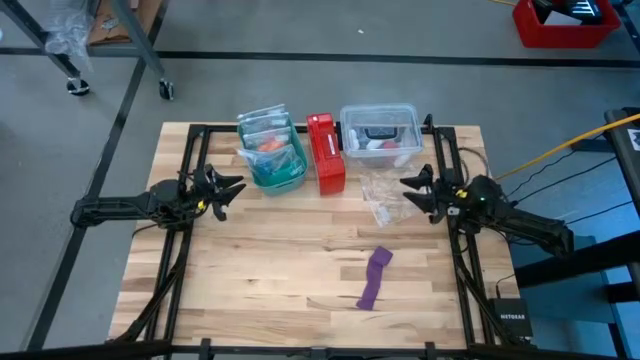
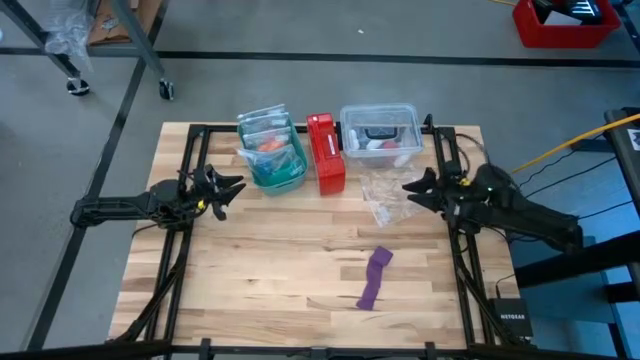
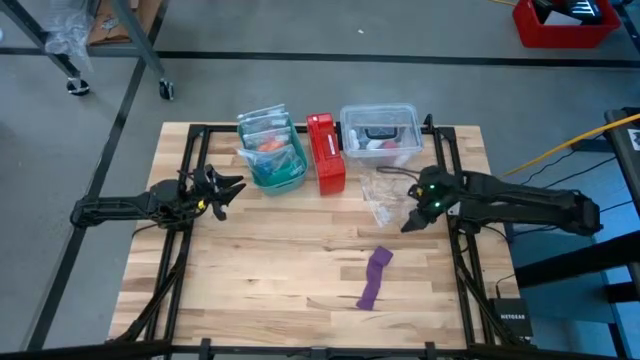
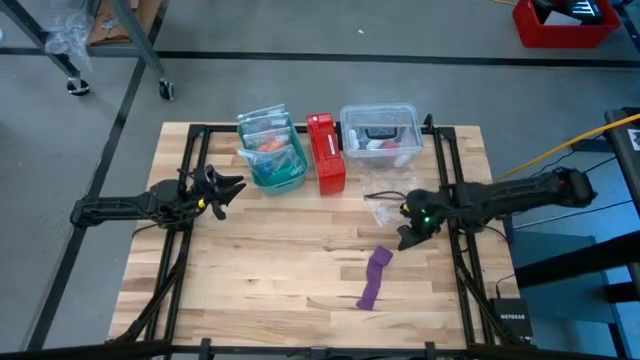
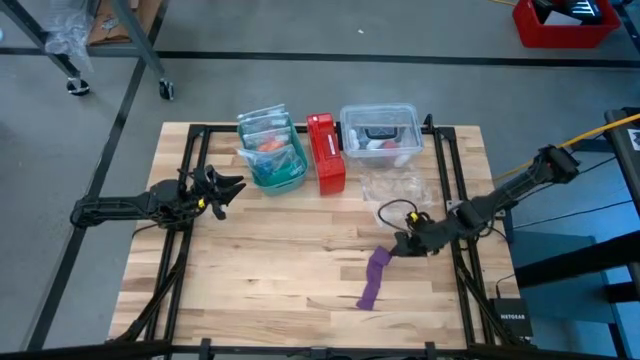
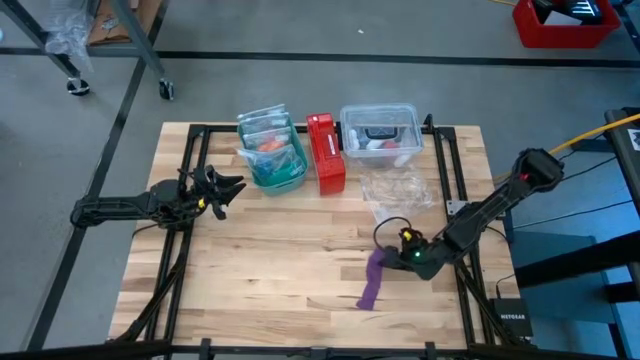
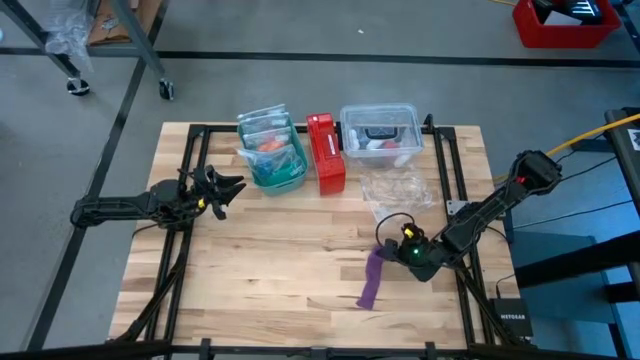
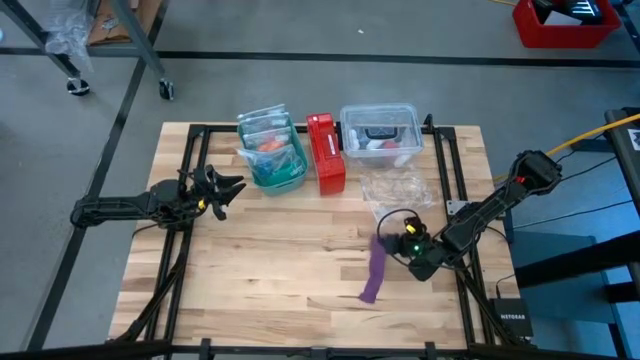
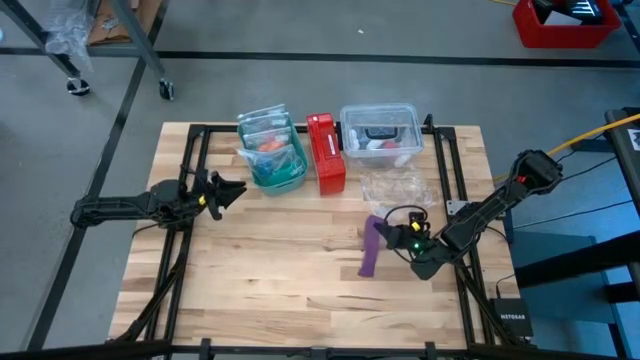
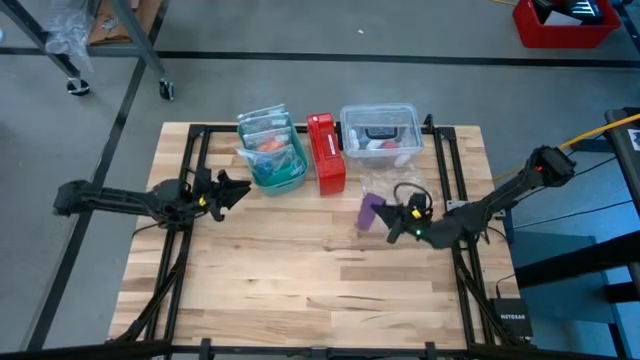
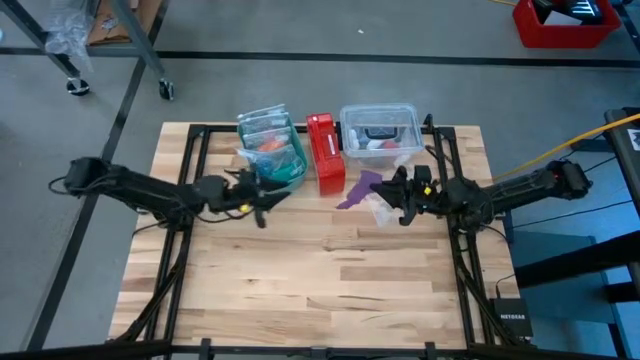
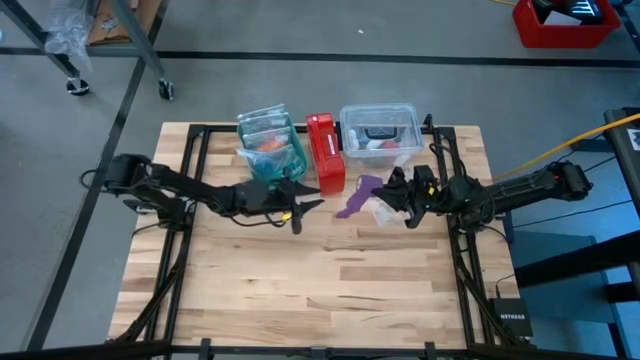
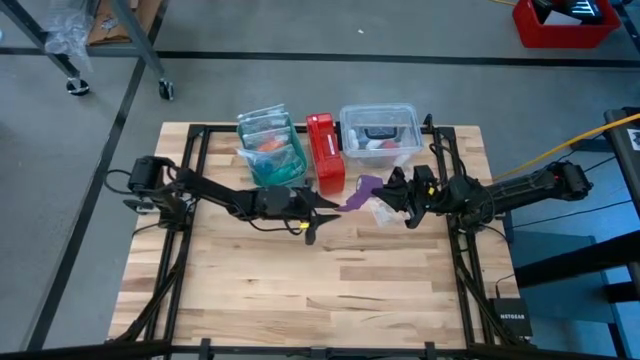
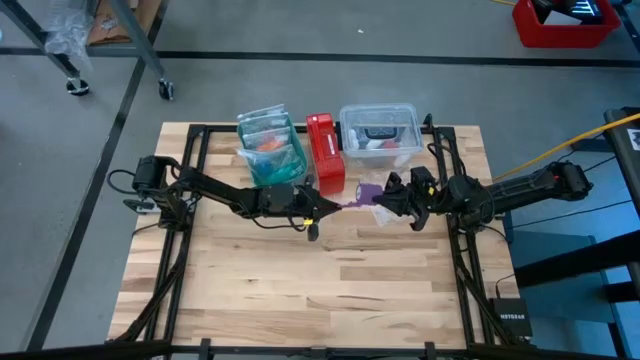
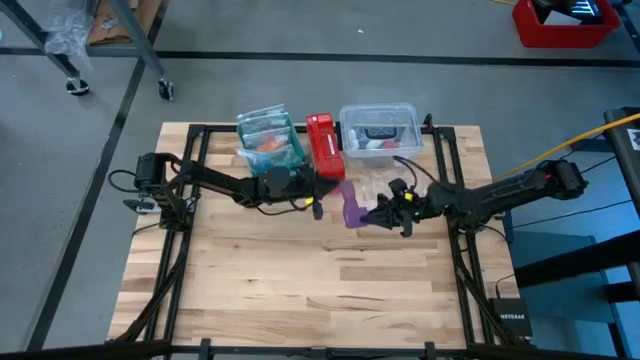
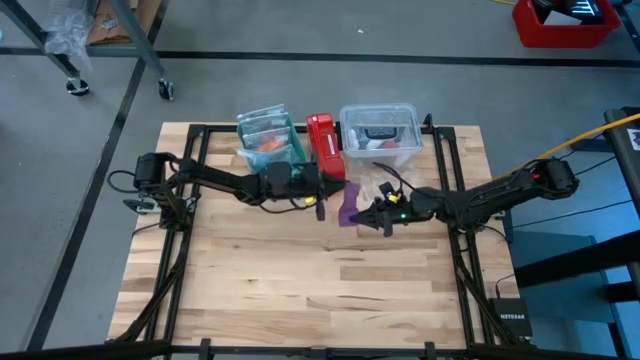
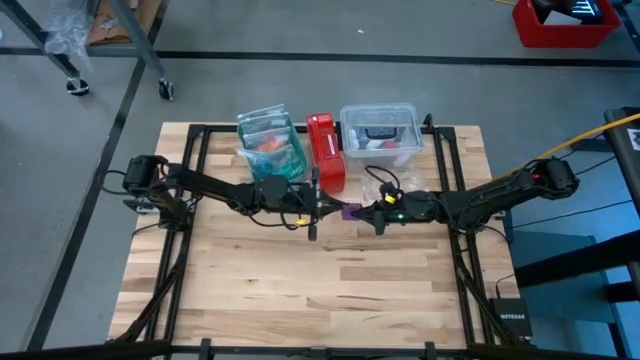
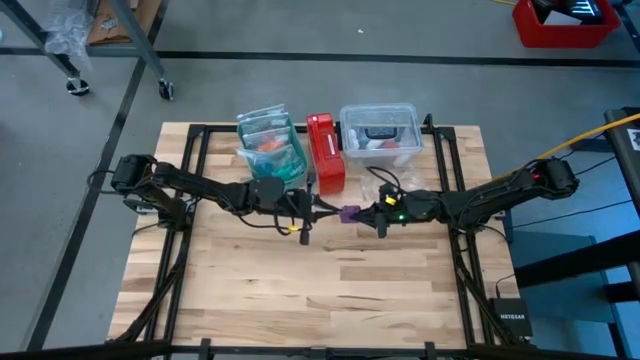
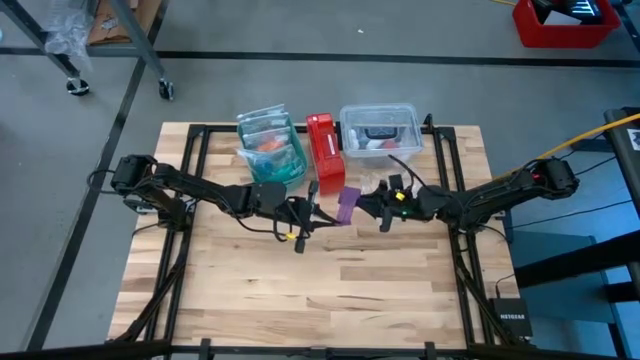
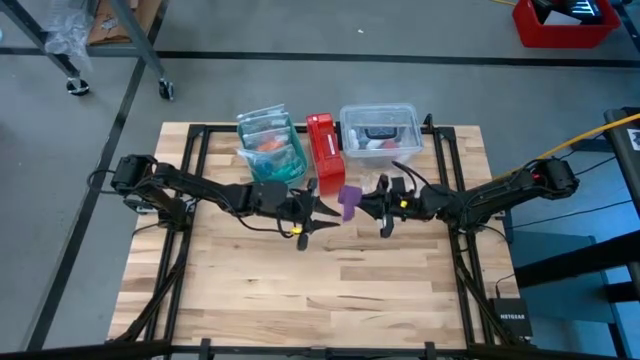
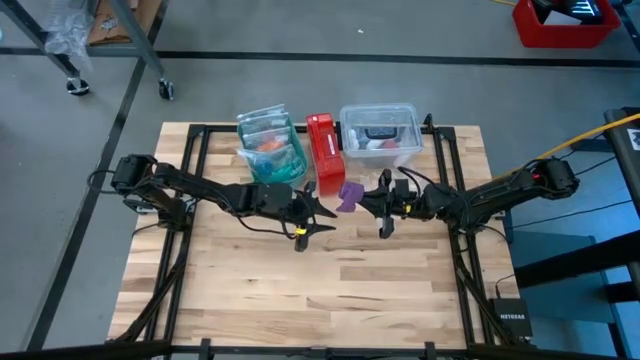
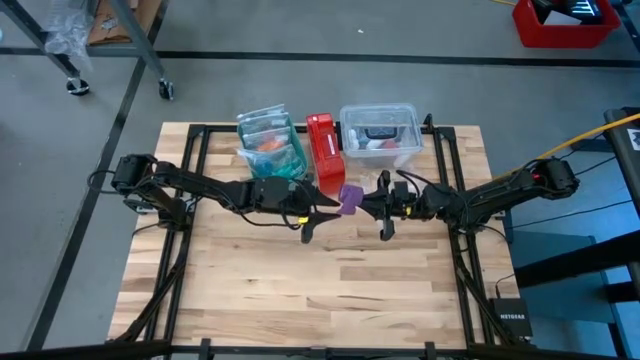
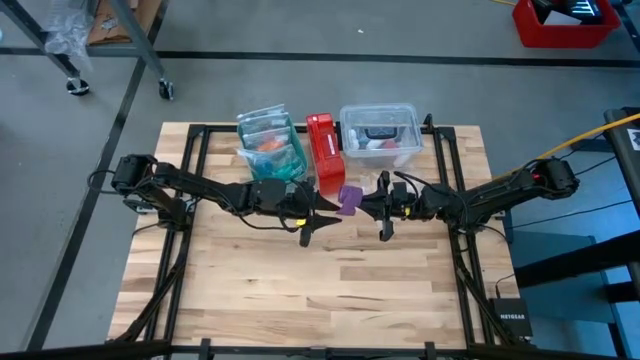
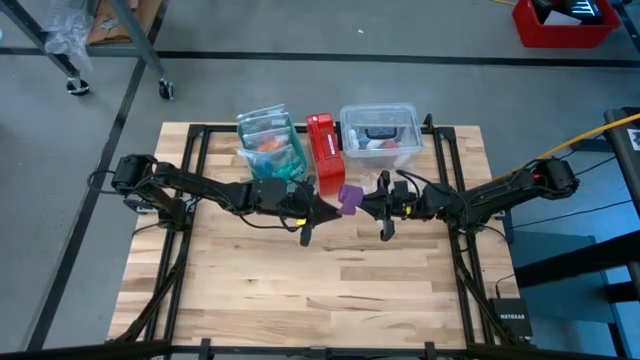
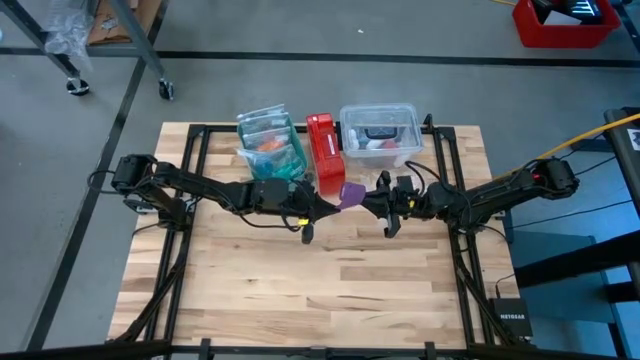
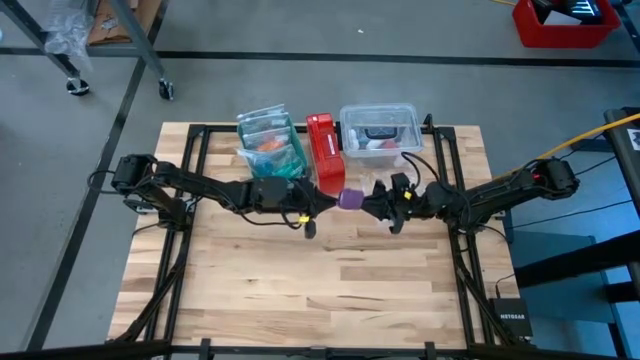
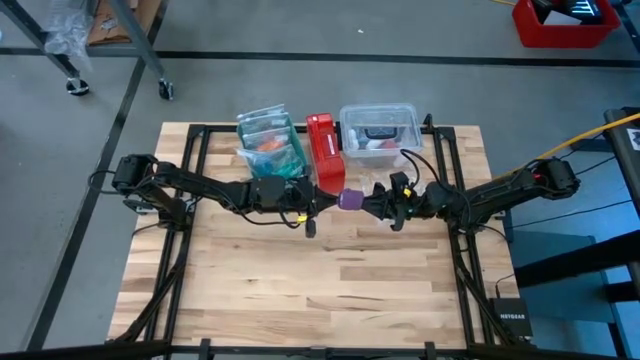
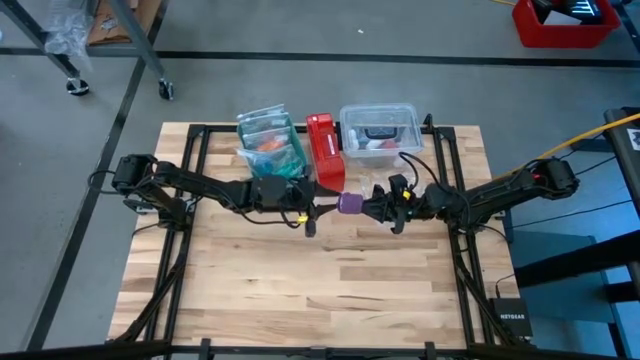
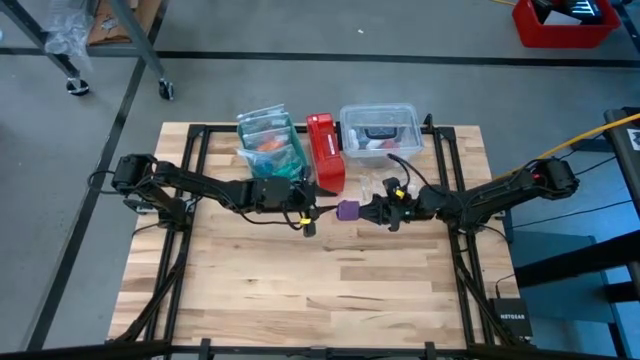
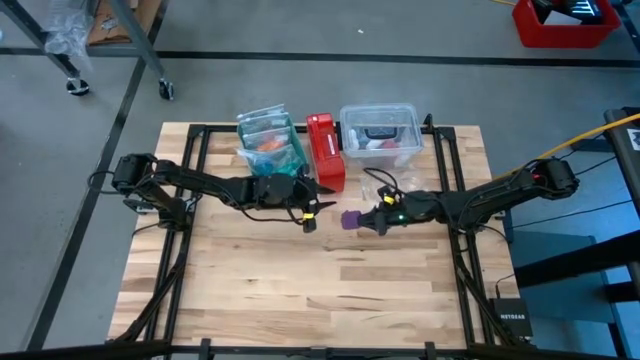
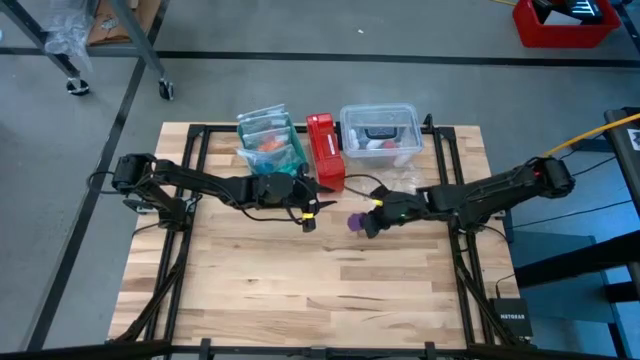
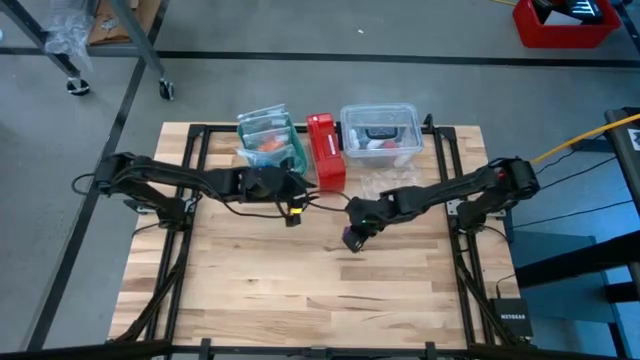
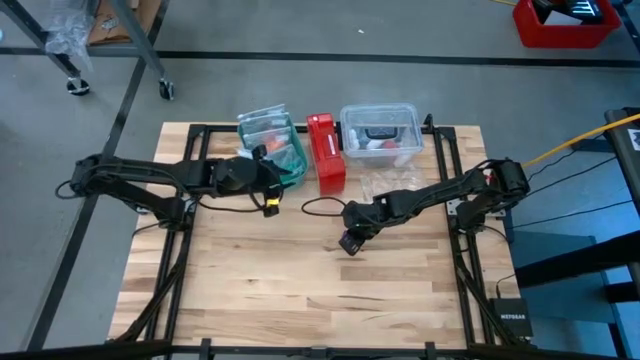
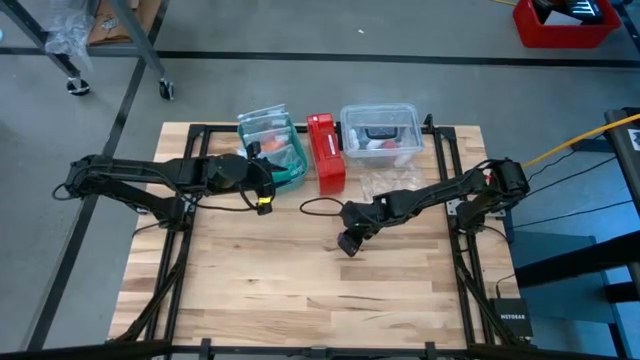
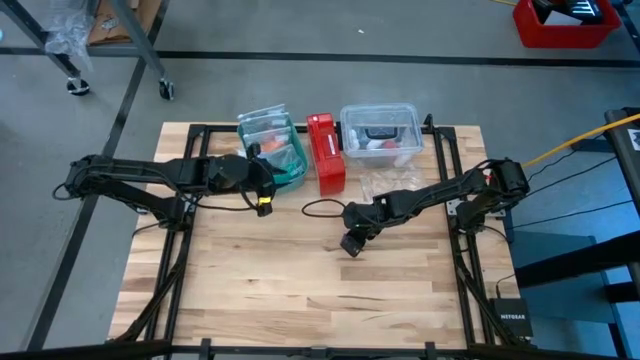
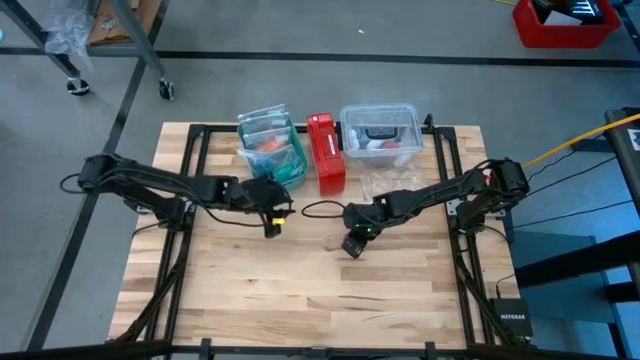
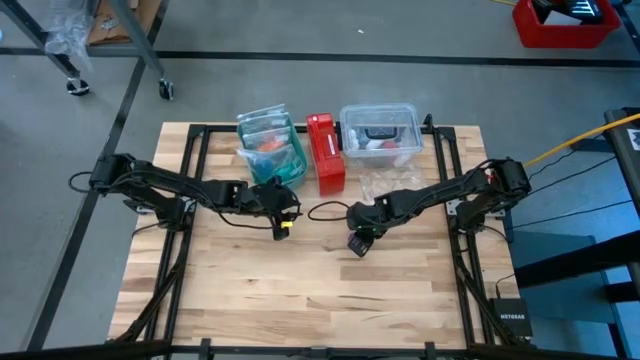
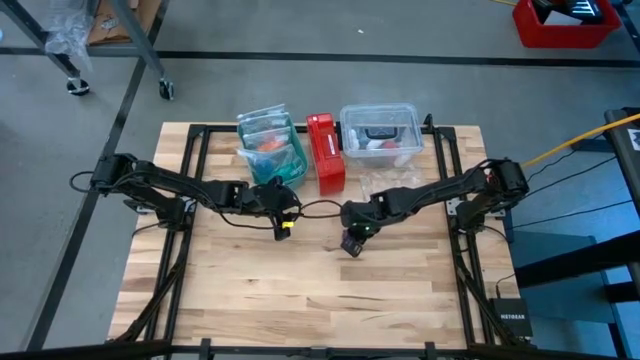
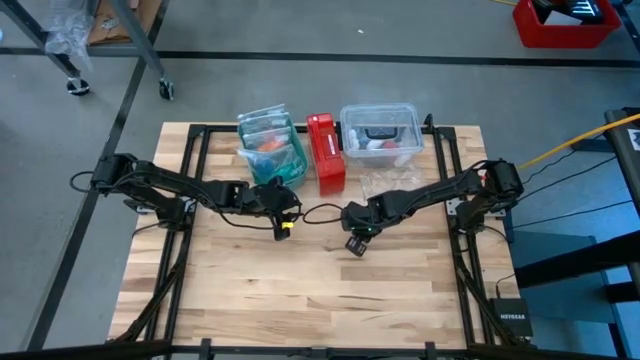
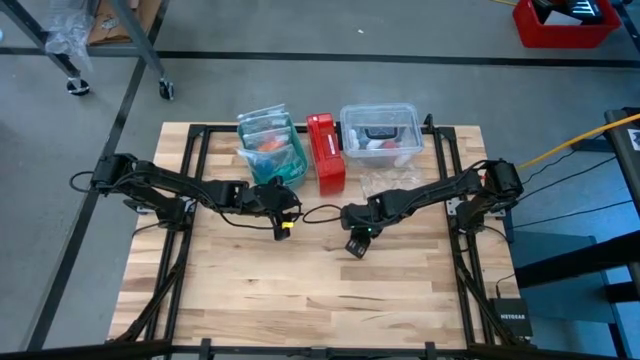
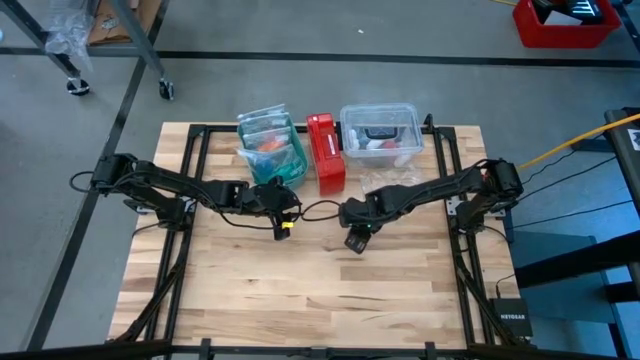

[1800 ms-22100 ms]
Task: Roll bandage
Roll the purple bandage
